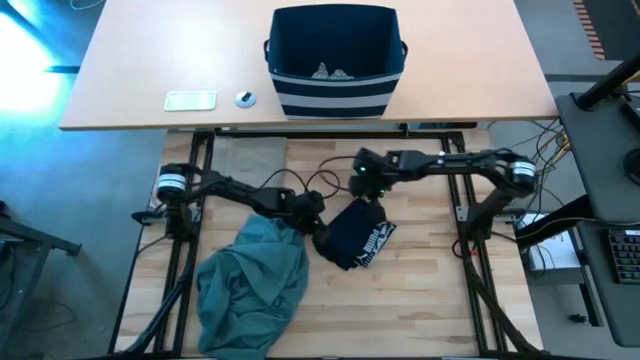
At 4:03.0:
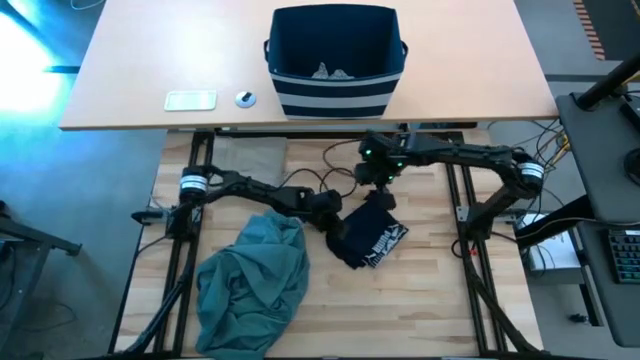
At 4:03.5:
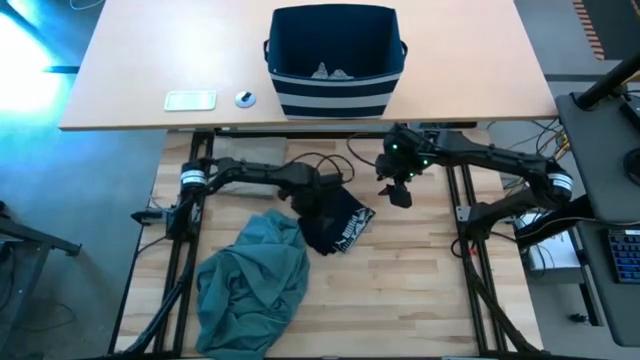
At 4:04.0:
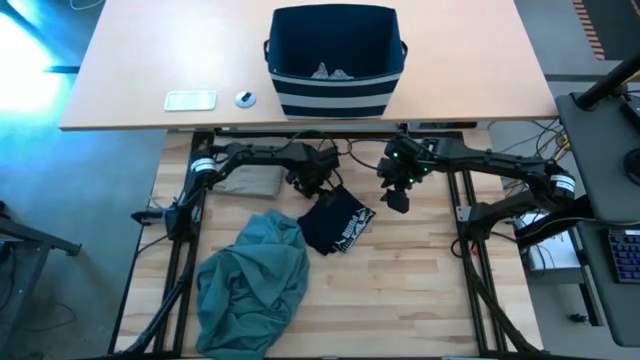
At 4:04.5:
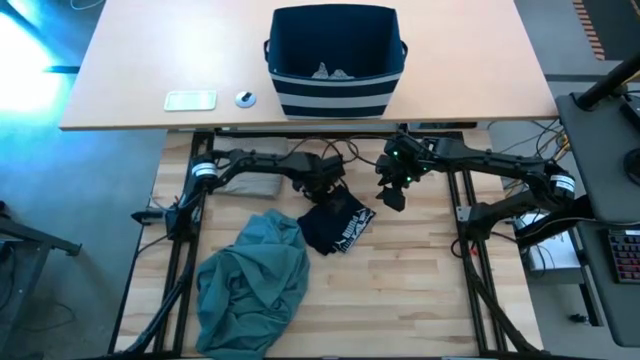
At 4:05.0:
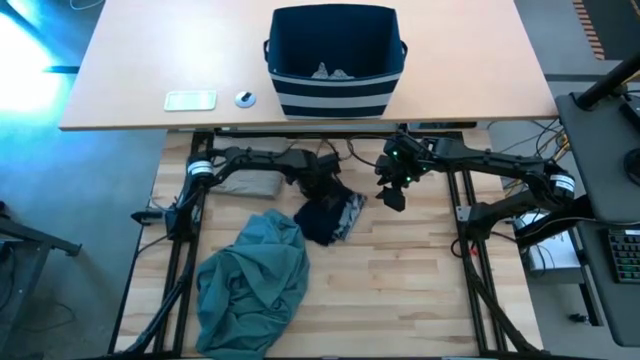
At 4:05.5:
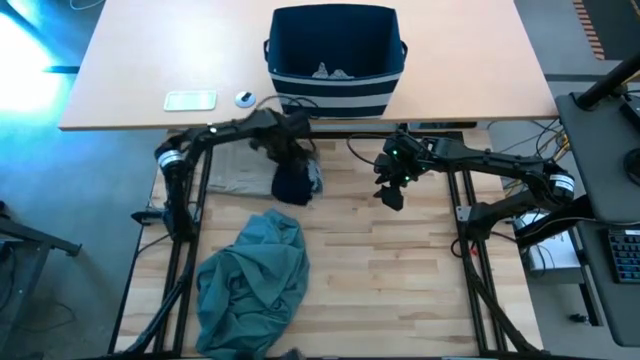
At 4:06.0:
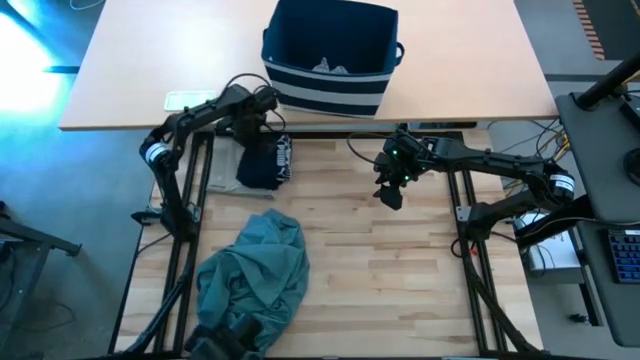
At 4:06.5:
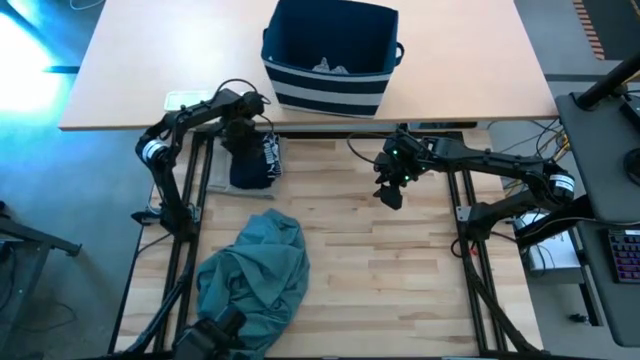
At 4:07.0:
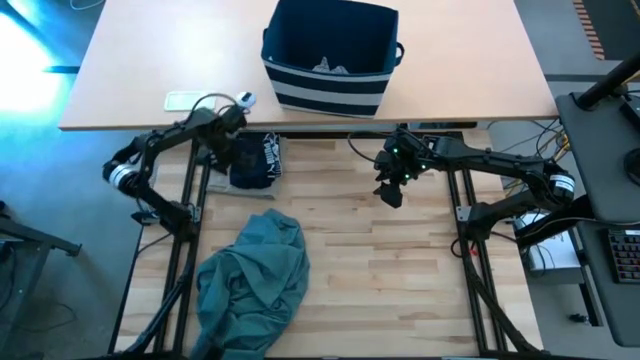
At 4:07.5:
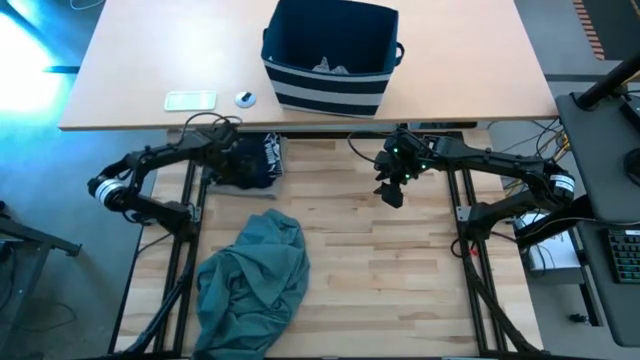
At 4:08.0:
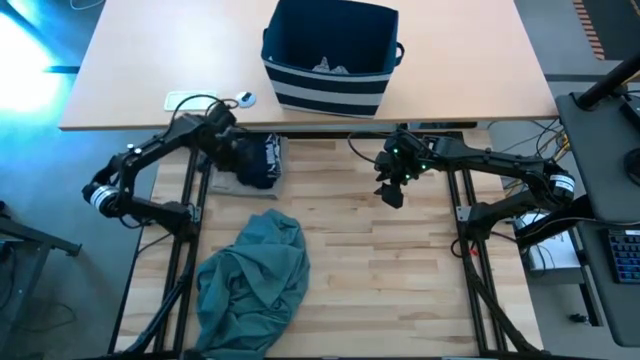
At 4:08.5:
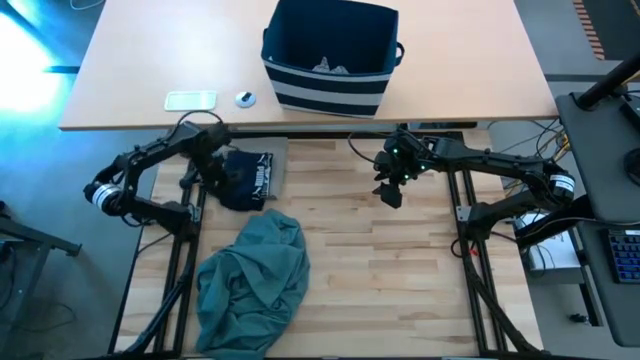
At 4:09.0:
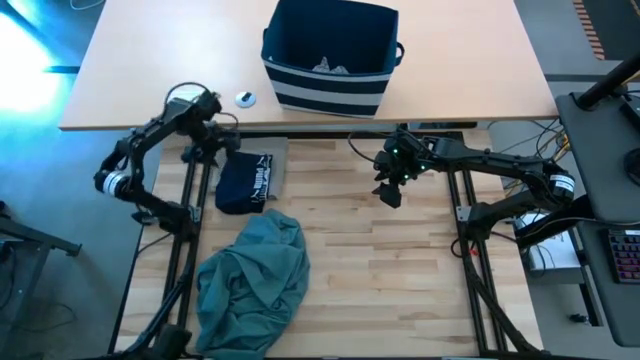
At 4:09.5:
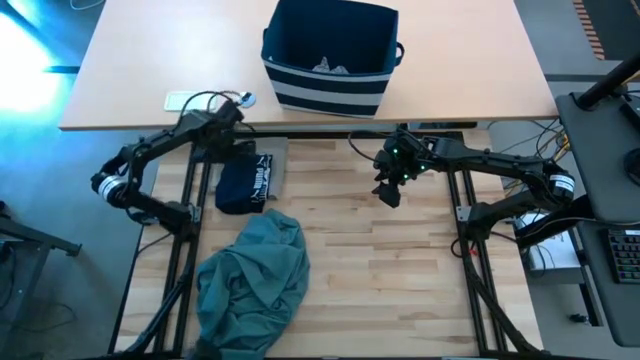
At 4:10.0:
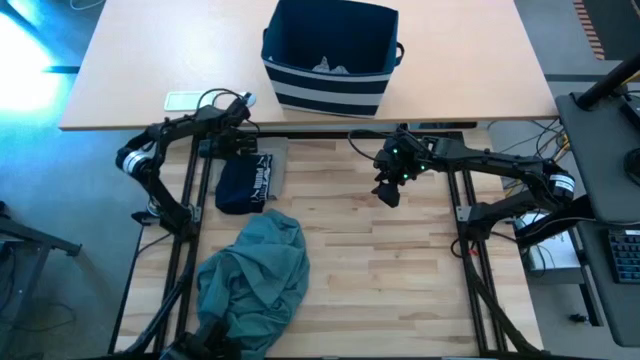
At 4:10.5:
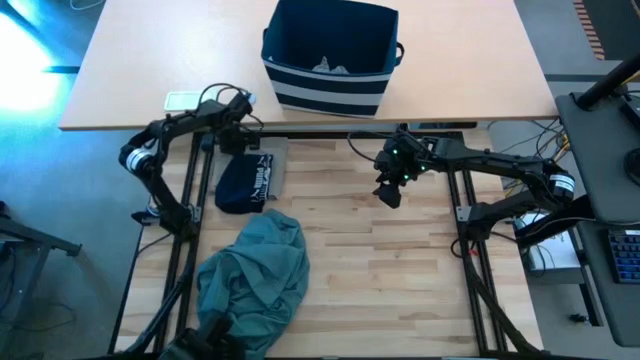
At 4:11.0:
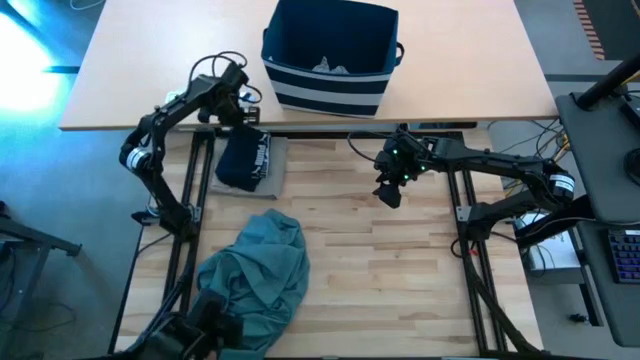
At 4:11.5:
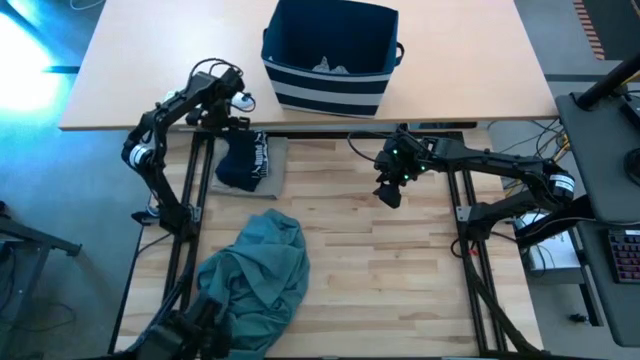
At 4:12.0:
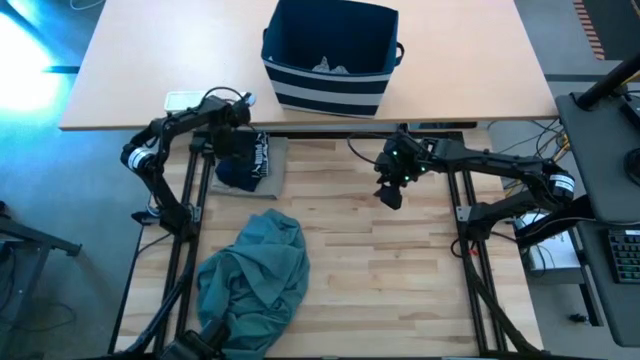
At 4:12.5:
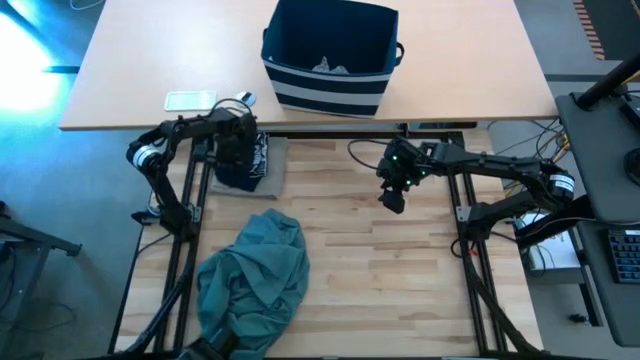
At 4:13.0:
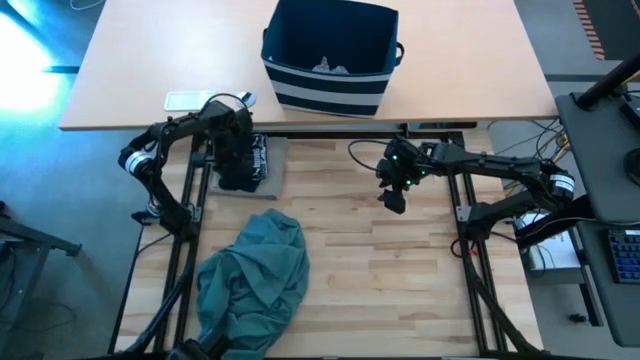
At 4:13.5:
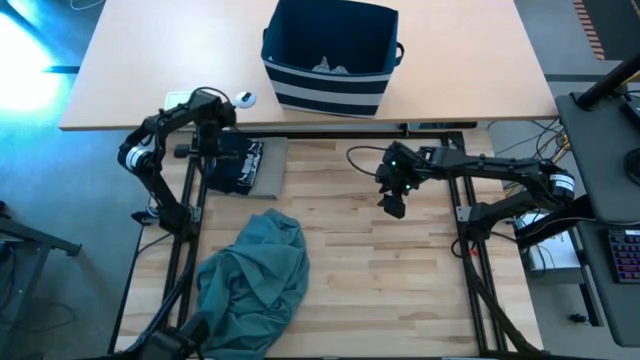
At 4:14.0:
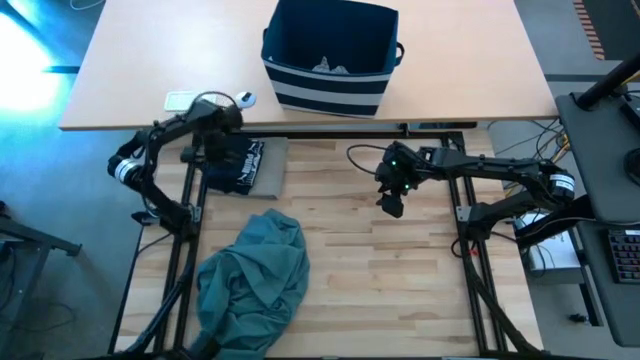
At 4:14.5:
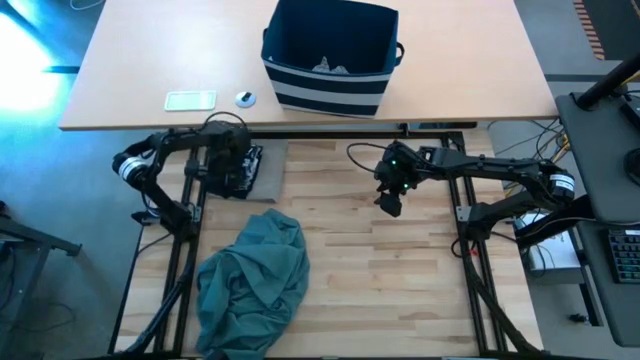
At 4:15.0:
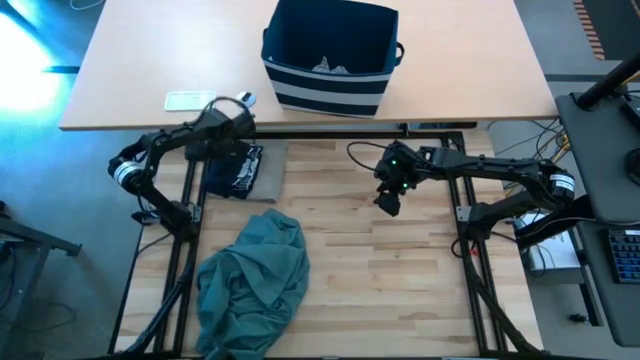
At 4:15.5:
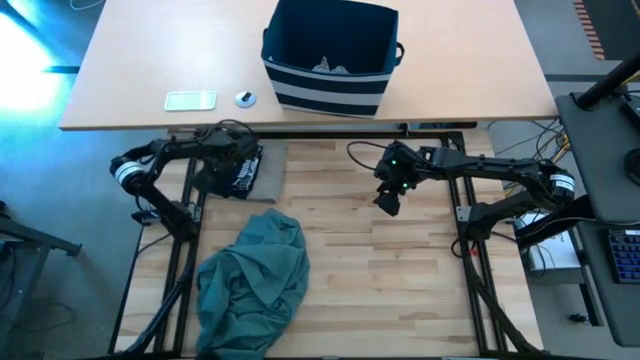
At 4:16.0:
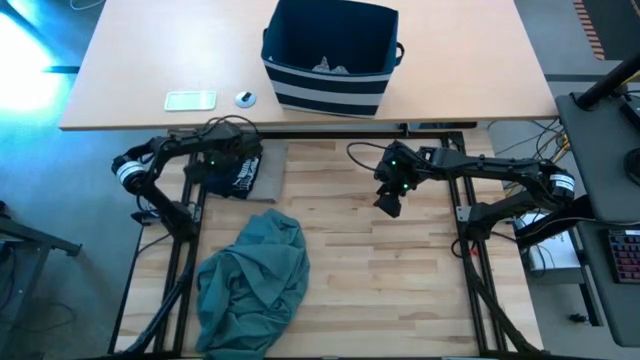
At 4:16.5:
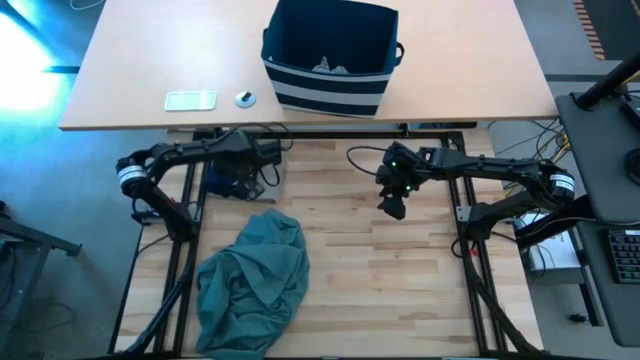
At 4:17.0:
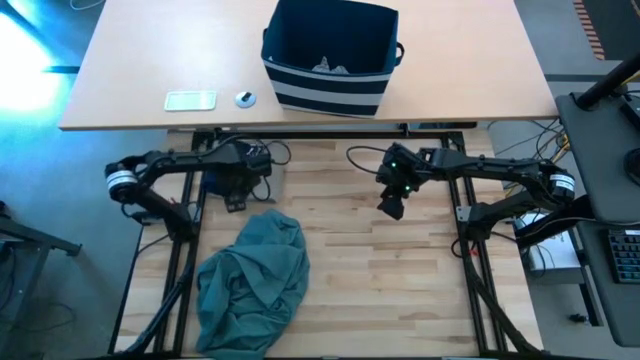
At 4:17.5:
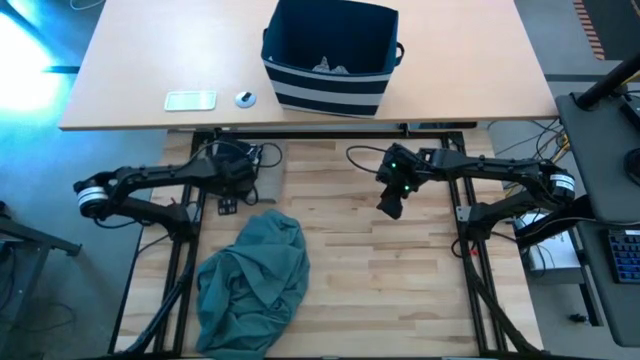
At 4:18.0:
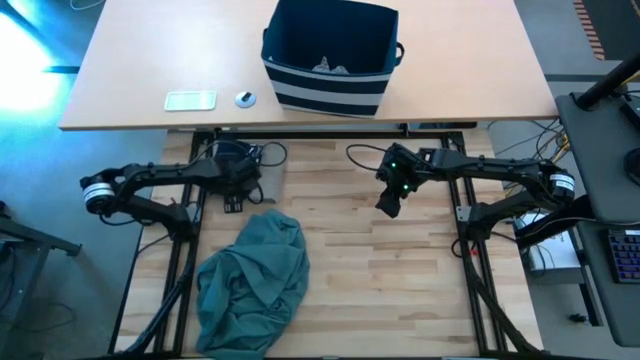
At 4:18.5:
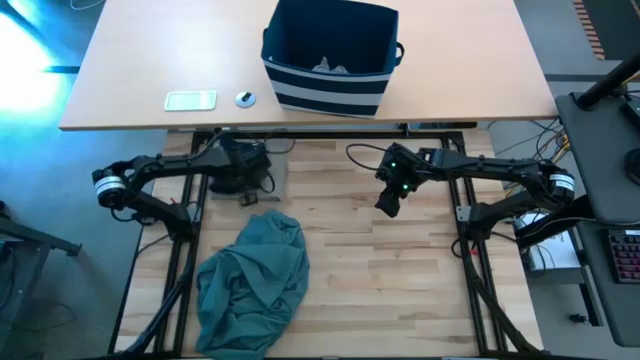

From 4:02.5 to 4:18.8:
Task: Fold Laundry from Bin
Stack the folded black underwear on the folded brown shorts

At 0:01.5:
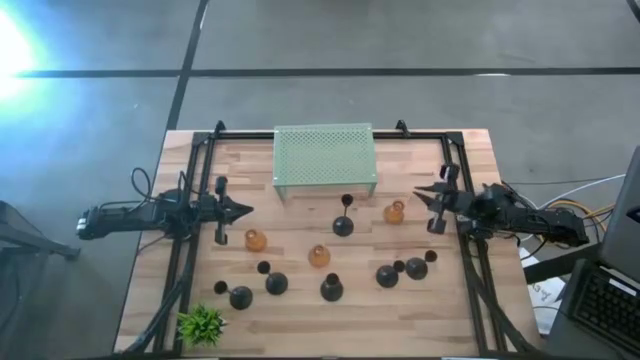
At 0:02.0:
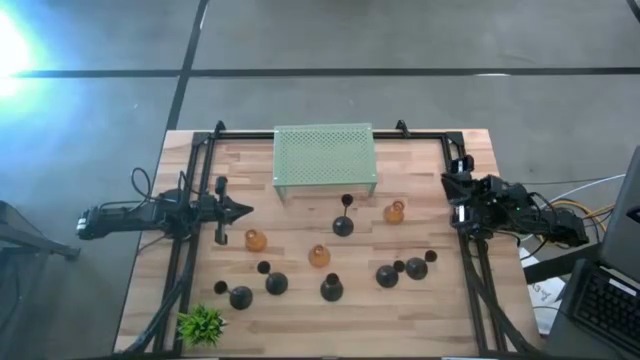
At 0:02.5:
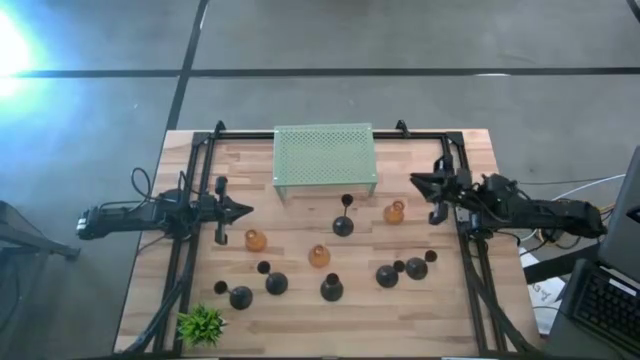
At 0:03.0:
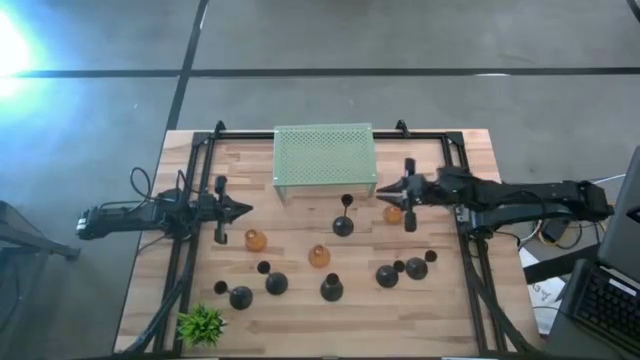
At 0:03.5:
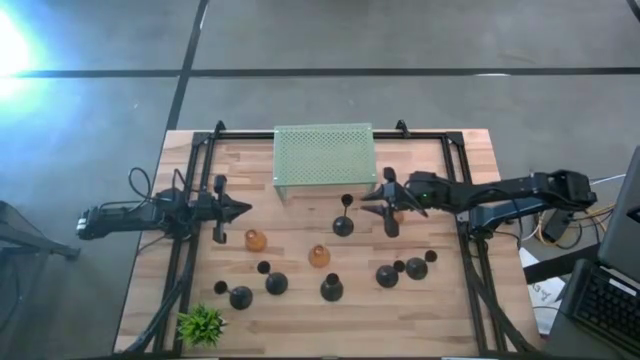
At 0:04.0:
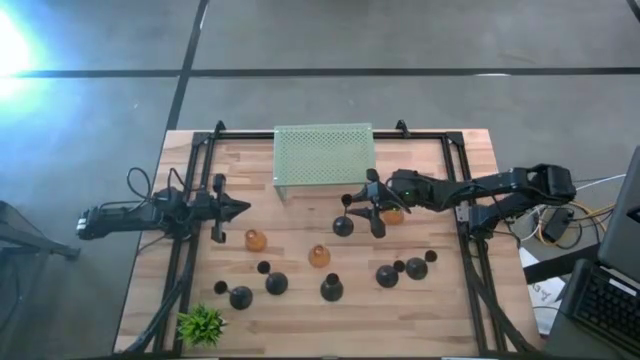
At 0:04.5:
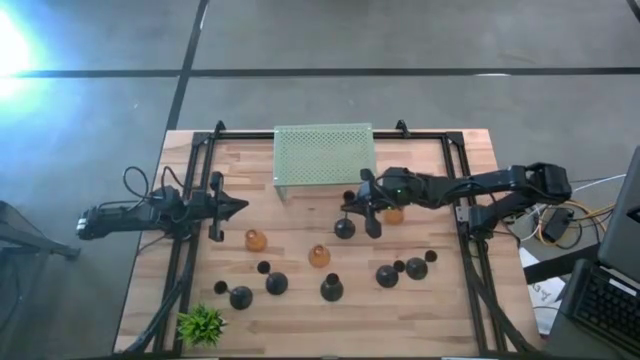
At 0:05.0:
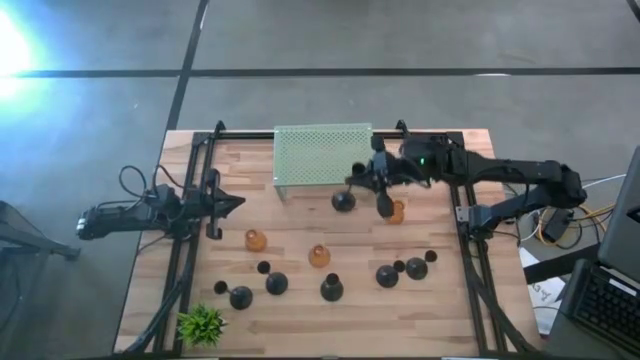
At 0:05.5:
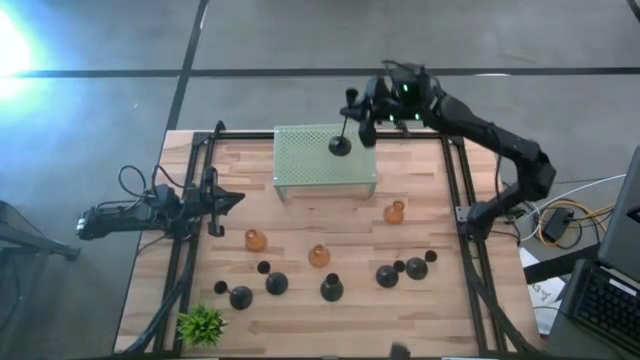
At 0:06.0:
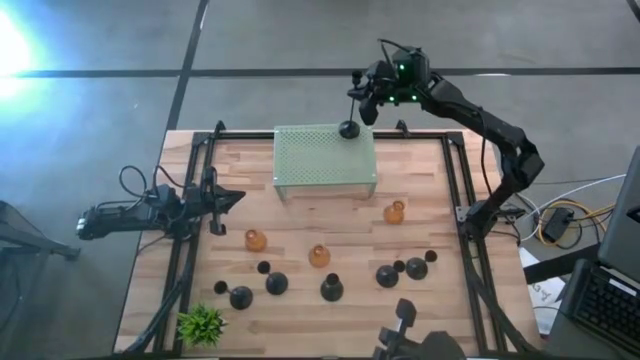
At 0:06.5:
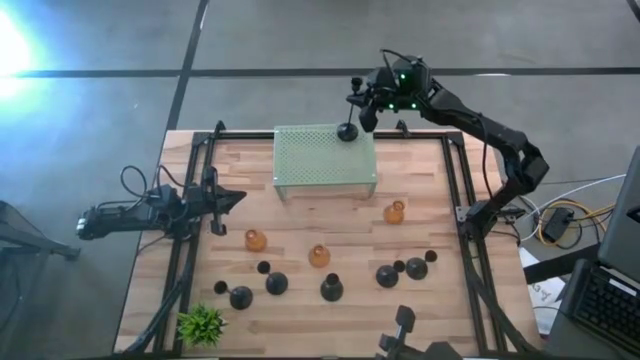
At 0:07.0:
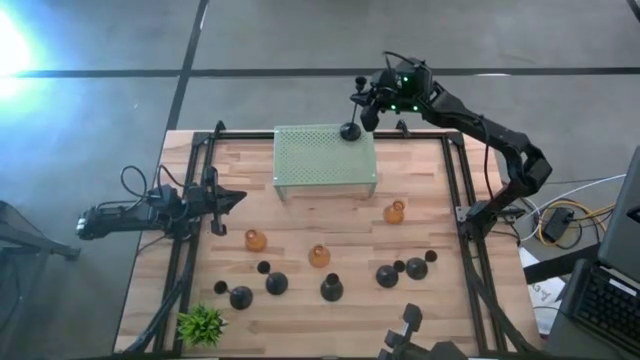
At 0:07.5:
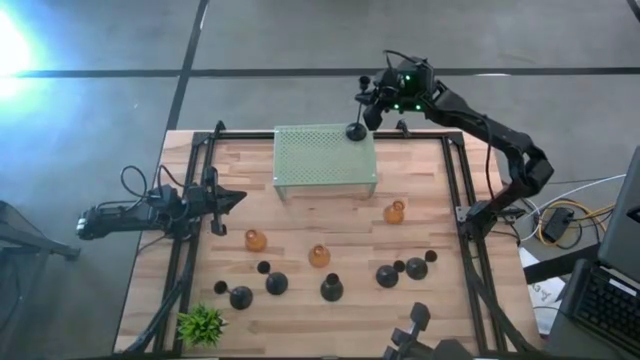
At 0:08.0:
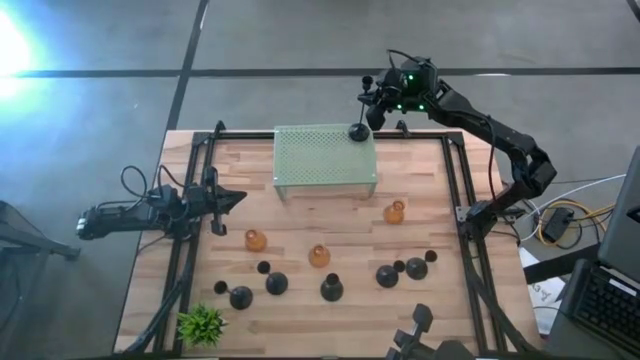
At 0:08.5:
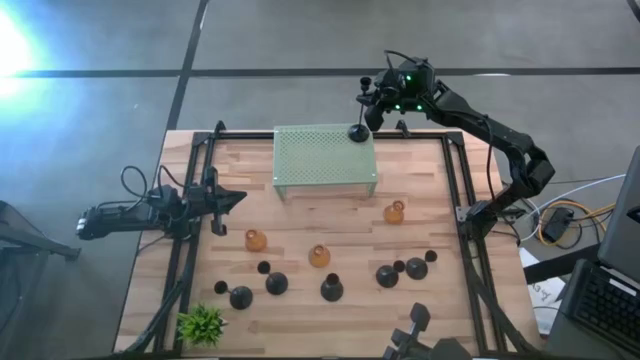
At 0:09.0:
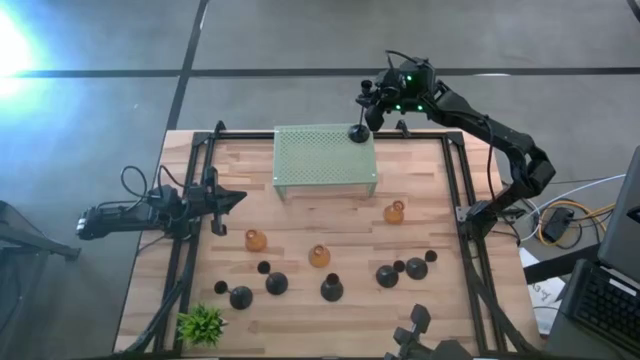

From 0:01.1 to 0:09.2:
Task: Pick & Place candle stick holders
Put the large black candle holder on the top right of the shelf
